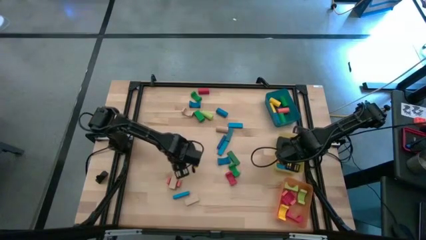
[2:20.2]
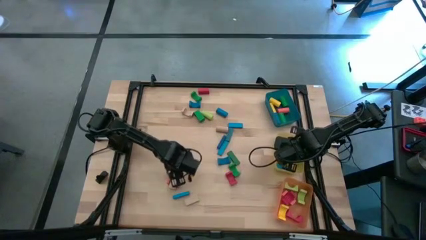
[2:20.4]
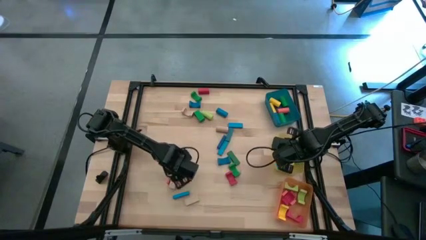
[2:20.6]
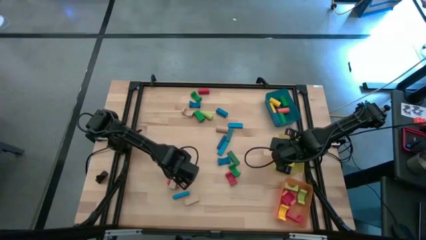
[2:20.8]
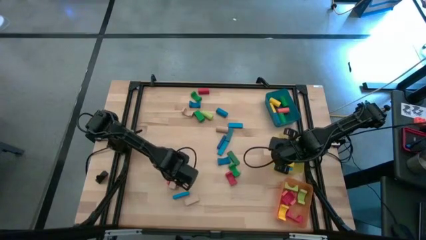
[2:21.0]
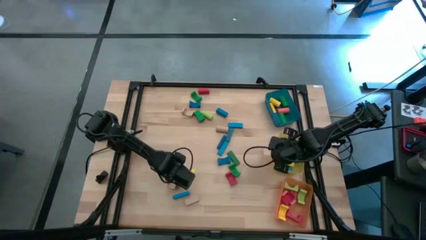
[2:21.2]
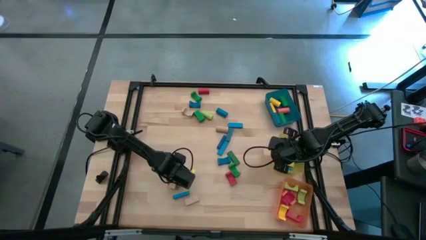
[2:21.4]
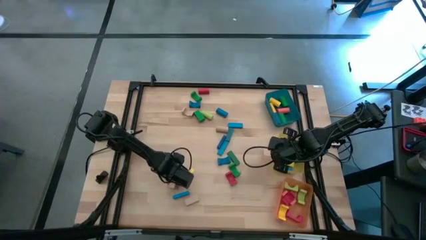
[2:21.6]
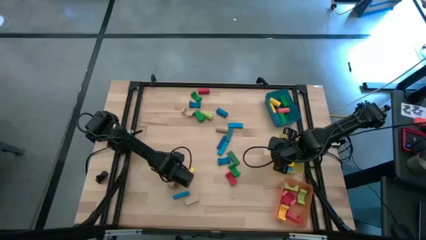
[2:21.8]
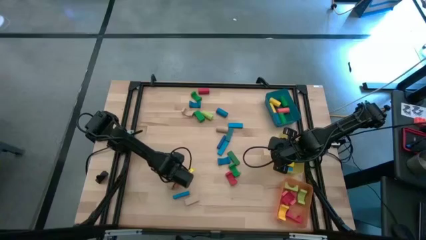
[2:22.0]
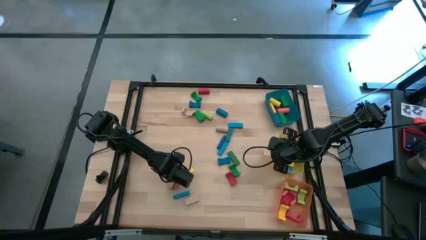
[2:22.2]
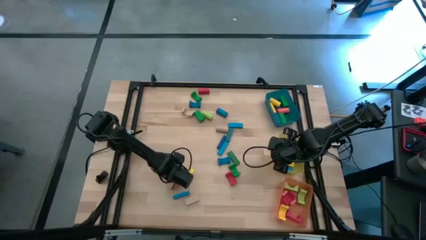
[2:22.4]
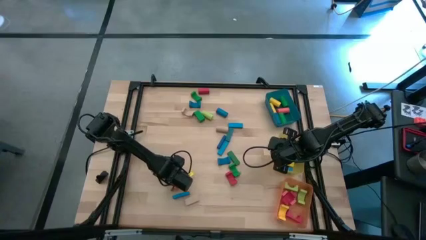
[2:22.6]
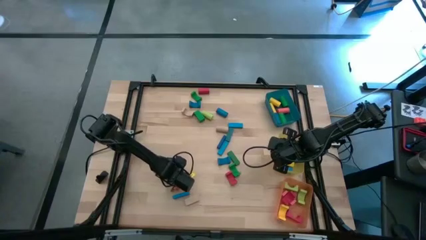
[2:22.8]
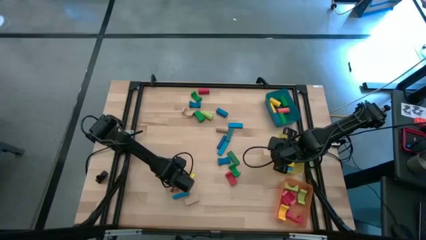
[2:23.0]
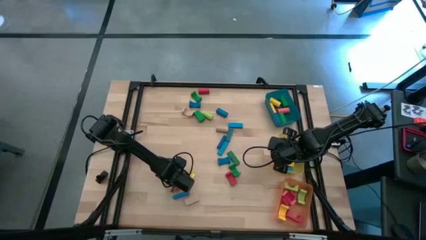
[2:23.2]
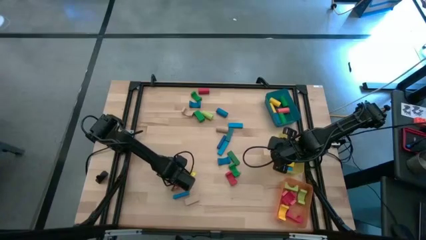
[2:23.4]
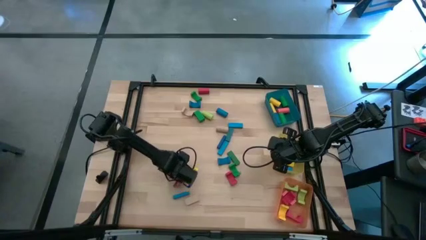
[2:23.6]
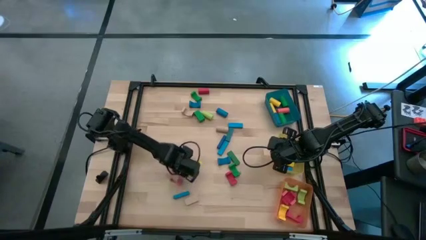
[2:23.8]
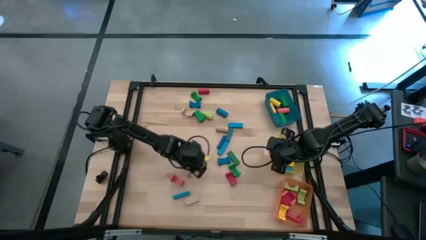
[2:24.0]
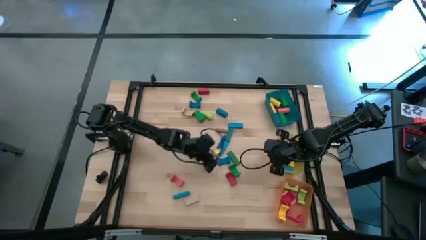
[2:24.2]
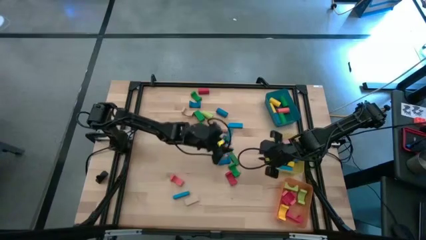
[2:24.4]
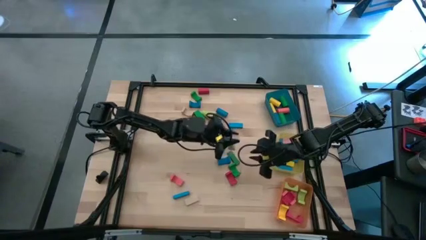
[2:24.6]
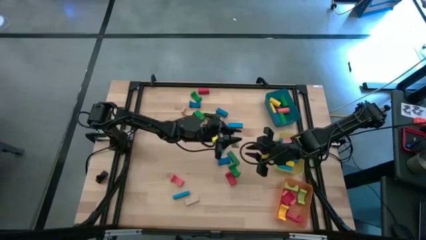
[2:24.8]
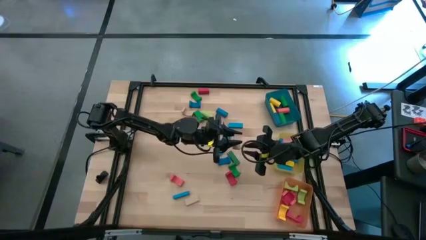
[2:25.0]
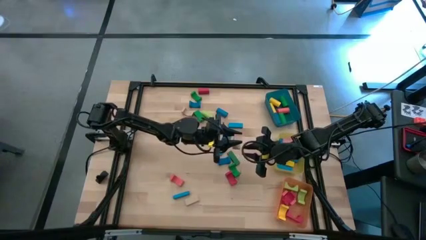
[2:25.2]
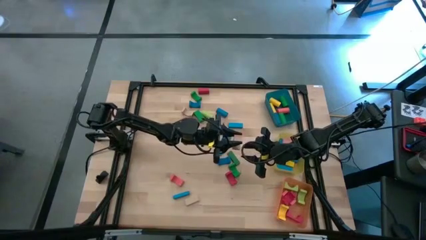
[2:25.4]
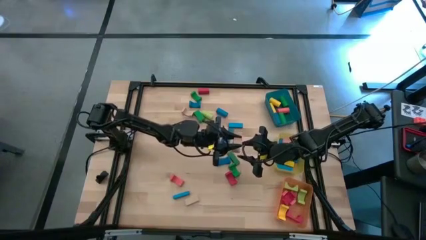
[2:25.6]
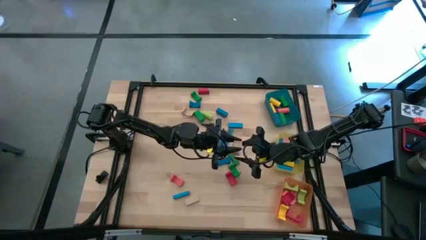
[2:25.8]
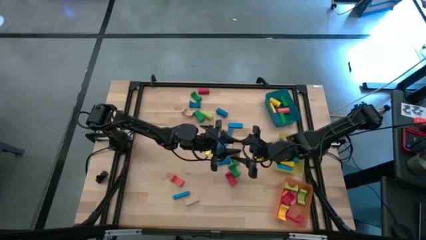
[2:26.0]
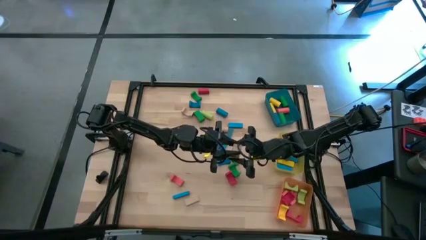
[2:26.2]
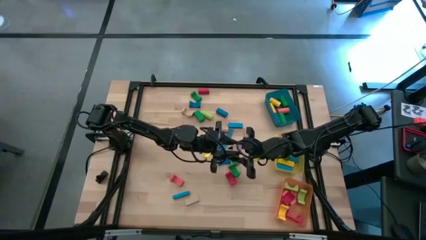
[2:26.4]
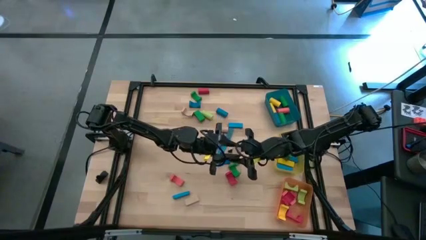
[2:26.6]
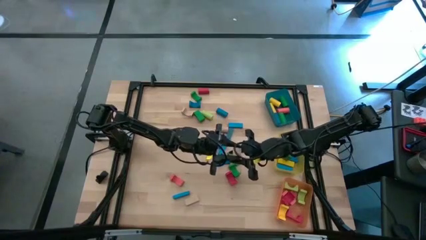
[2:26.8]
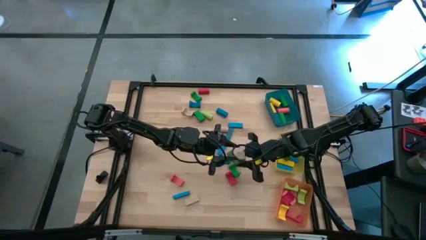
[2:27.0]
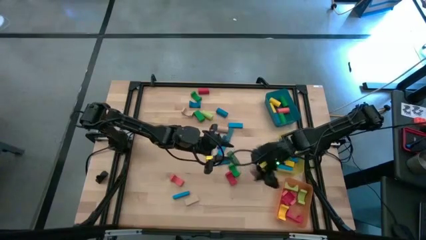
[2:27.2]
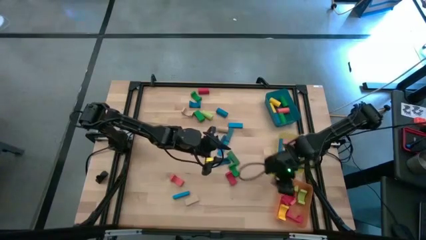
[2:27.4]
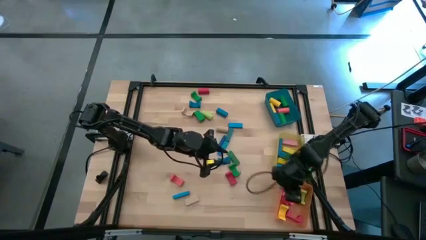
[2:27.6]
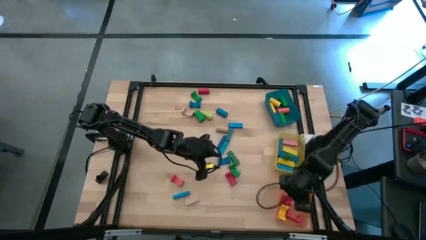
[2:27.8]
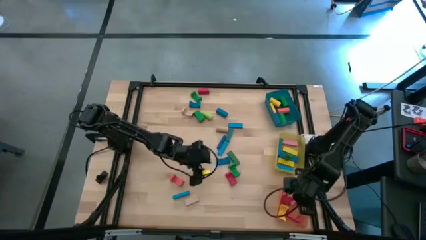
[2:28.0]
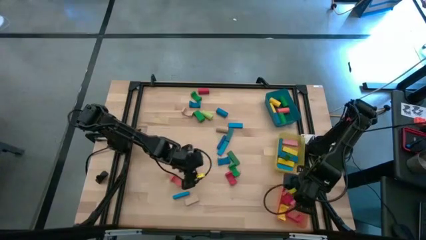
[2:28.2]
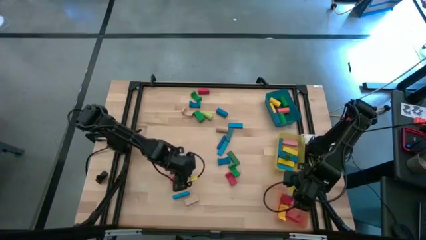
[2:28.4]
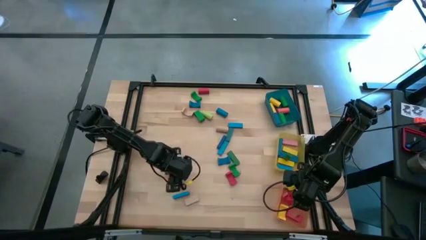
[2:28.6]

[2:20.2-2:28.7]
Task: Sort blocks by size
Put the brown arch block into the orange bin

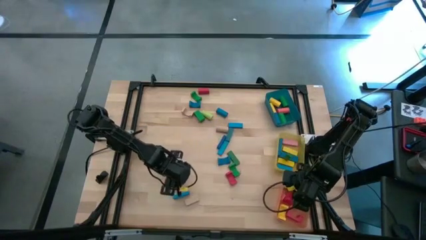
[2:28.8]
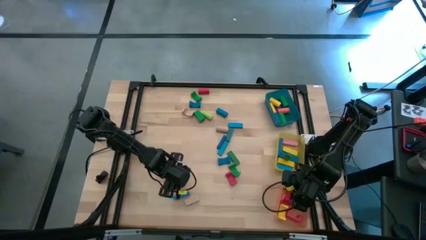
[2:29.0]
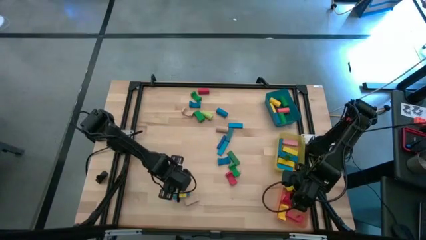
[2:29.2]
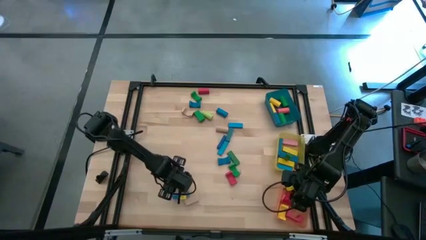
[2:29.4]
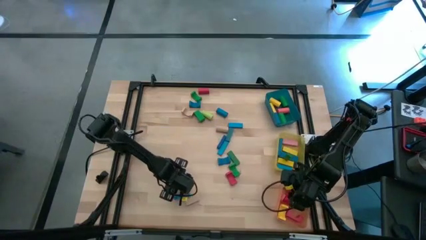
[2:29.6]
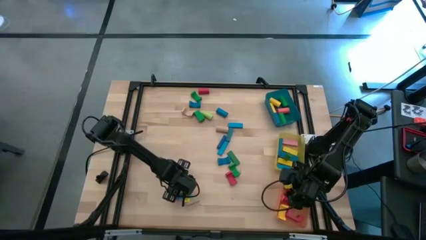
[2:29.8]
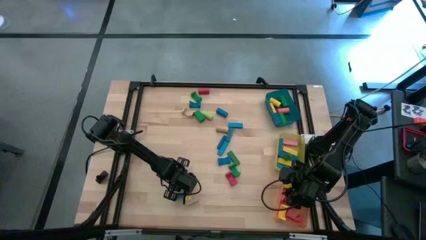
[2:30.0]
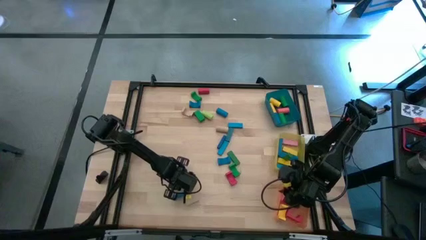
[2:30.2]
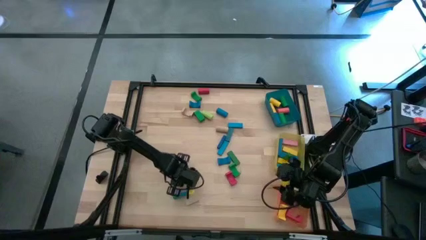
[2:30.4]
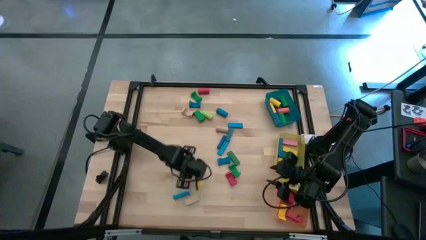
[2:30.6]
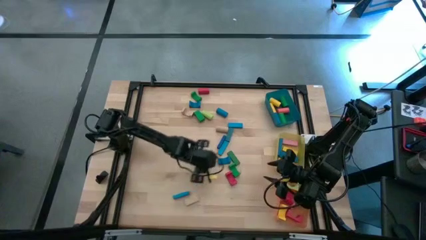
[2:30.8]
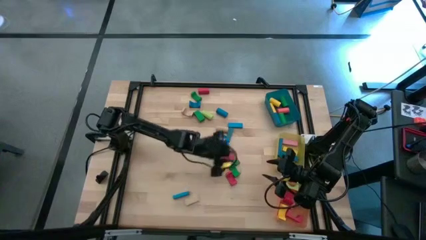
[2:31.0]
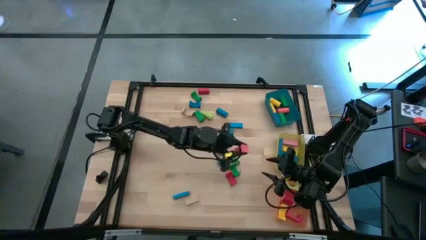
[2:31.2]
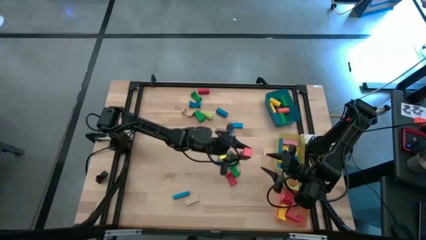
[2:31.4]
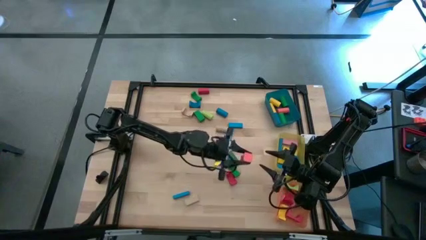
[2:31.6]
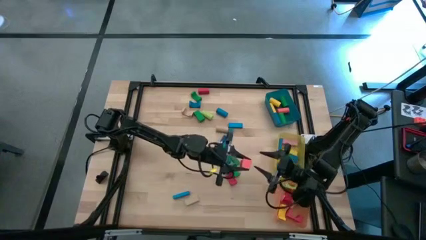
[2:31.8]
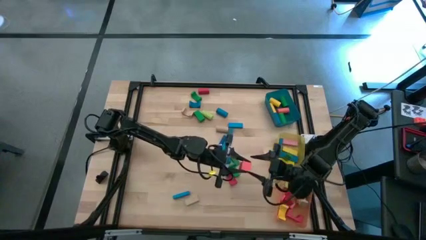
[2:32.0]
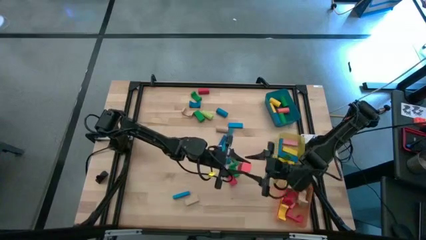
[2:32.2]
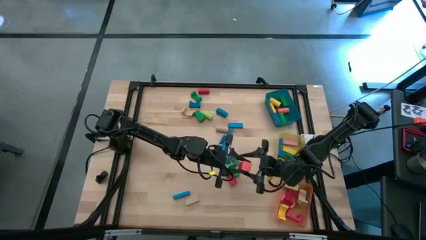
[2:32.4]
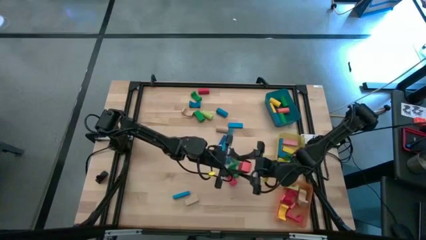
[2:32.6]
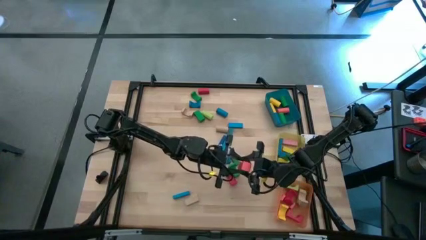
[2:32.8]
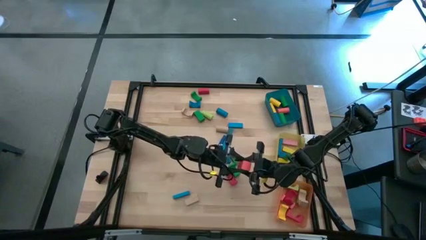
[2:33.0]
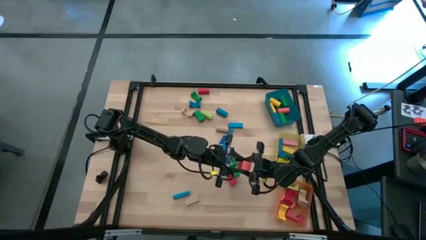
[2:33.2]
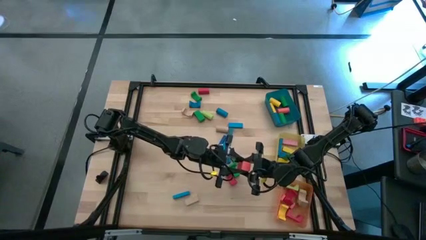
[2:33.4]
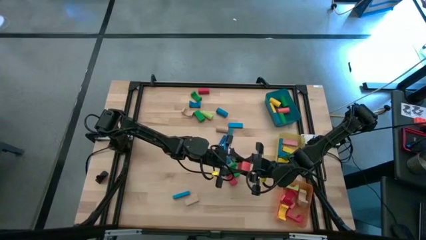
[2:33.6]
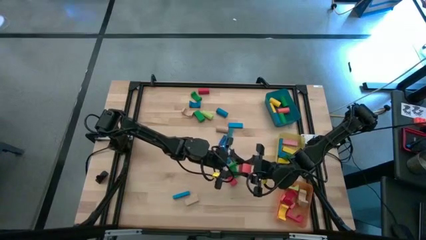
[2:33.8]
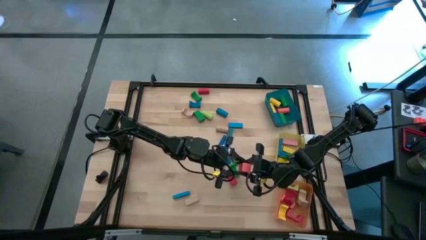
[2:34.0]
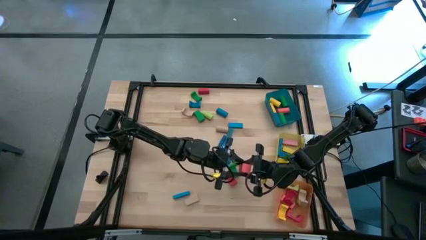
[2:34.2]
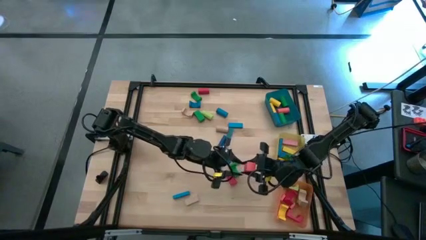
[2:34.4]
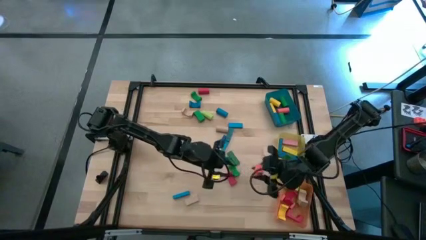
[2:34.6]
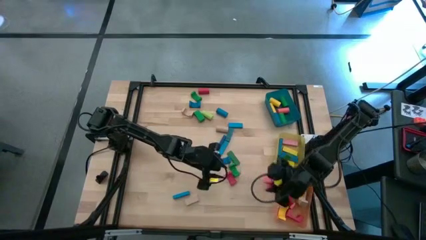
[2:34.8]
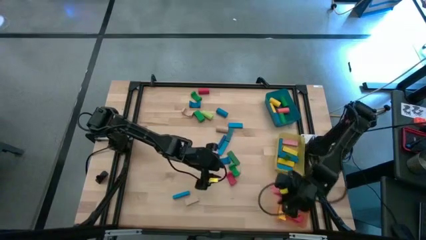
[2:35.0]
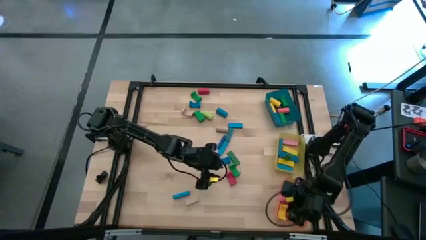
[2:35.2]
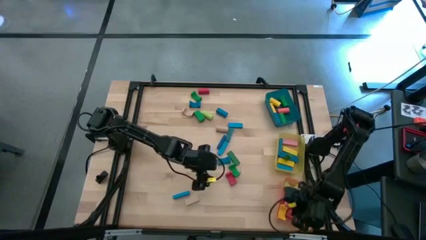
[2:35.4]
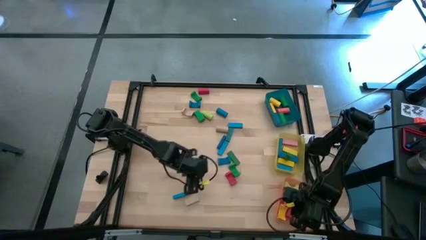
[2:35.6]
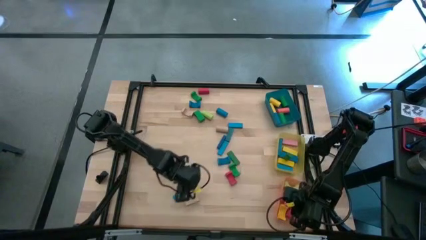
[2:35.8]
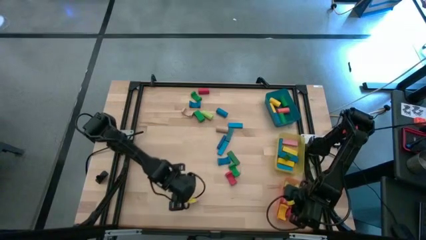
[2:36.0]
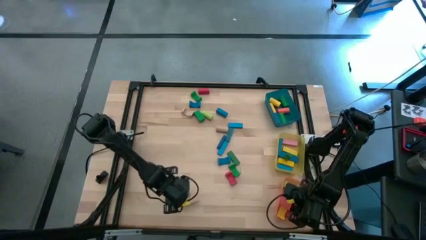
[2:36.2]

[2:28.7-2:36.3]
Put the orange arch block into the orange bin
